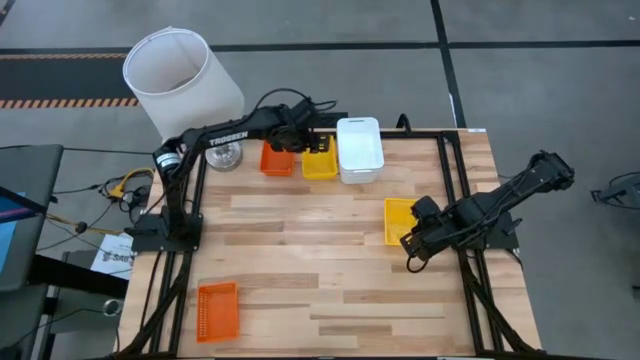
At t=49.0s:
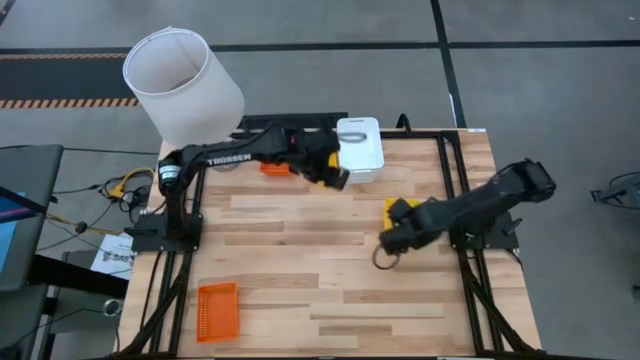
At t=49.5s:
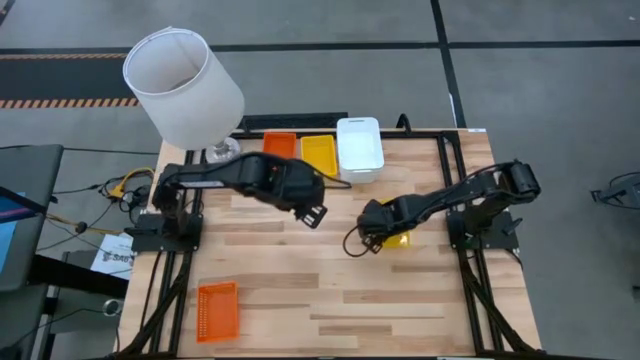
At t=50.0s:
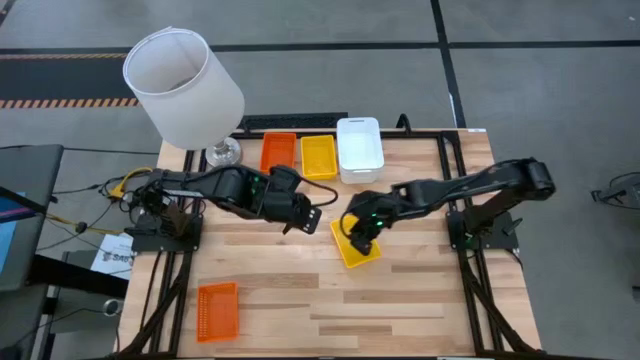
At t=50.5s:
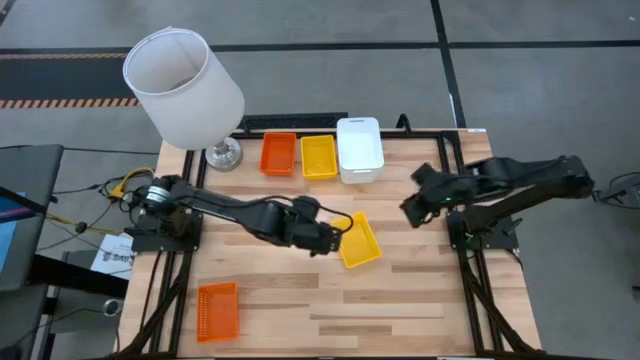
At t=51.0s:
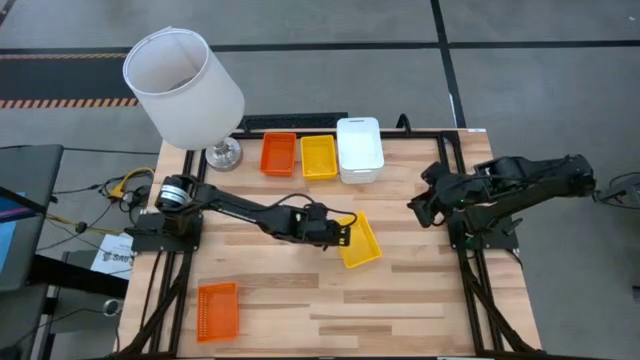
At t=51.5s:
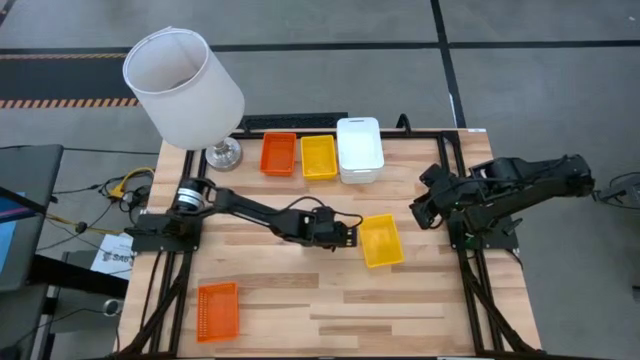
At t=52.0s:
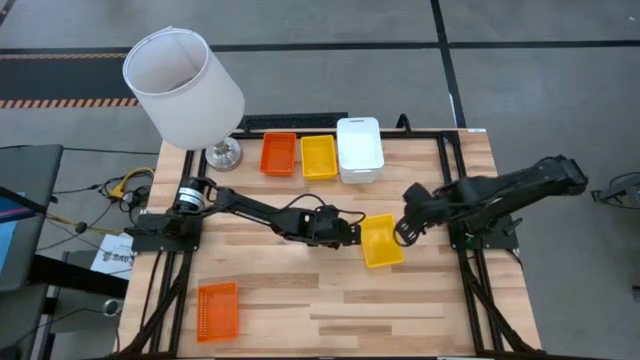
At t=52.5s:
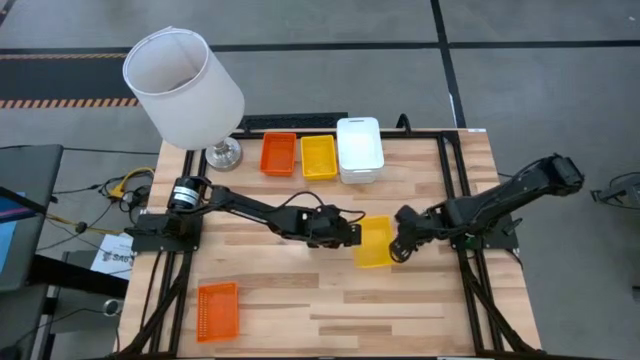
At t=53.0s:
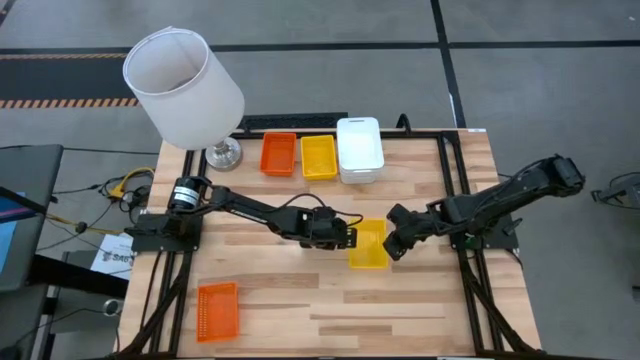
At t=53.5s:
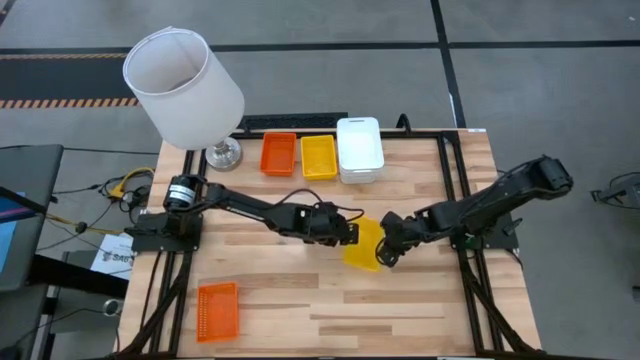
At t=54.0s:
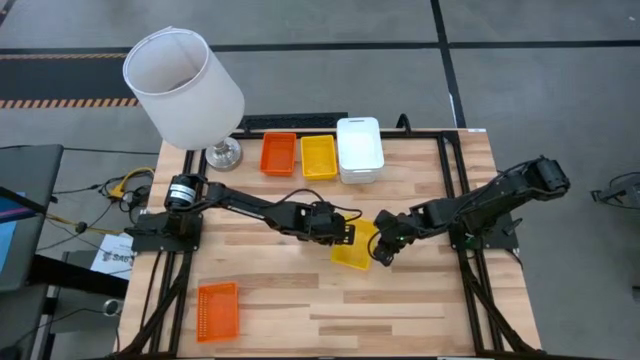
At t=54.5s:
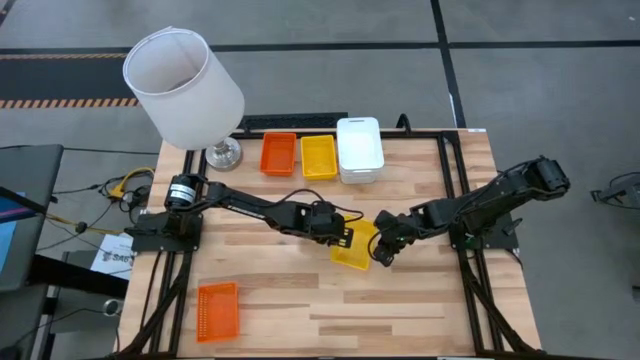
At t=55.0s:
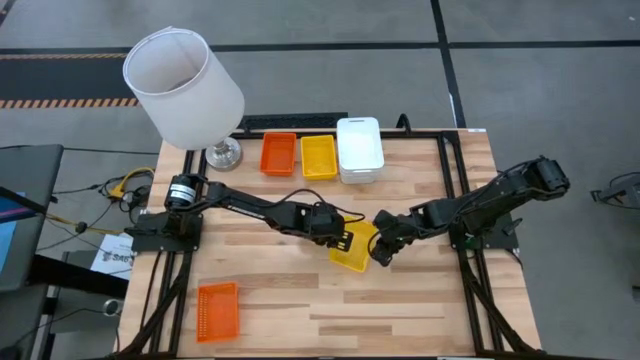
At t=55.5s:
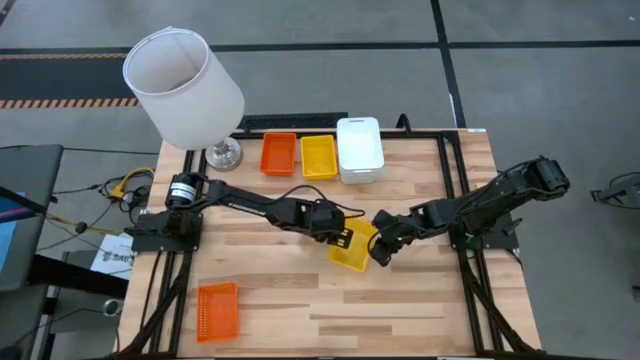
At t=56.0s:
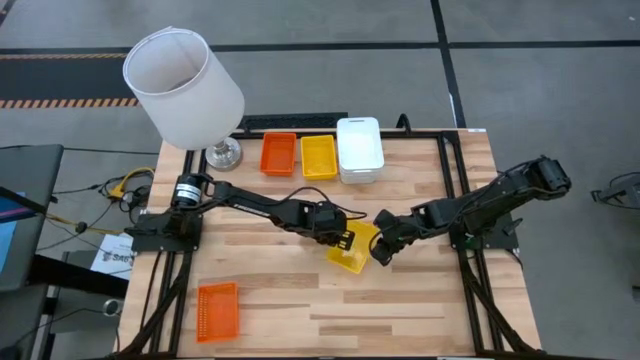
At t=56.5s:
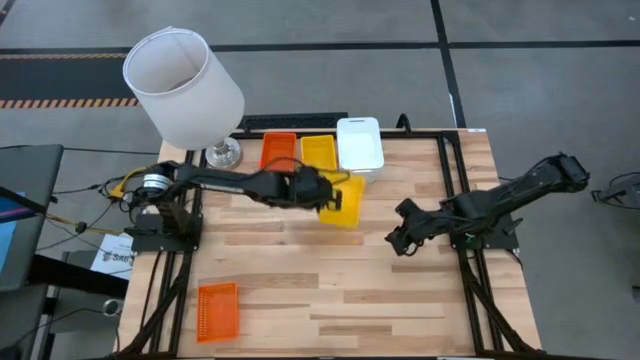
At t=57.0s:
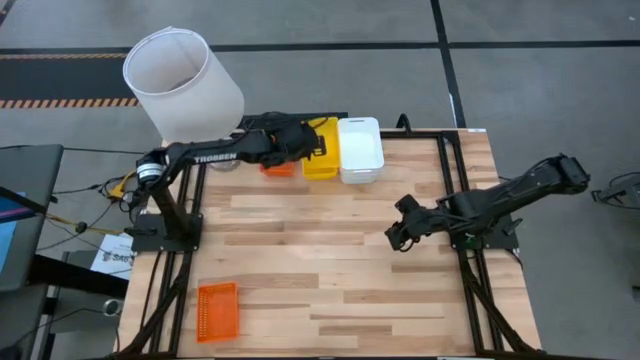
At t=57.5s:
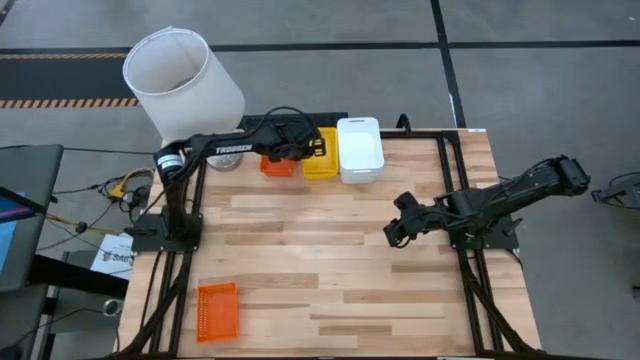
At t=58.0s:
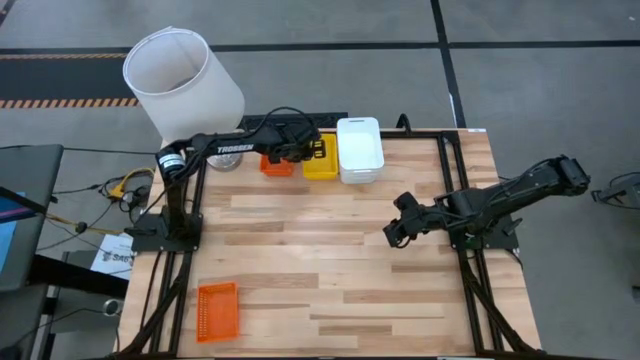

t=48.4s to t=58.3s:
Stack the bottom yellow bin on top of the top yellow bin

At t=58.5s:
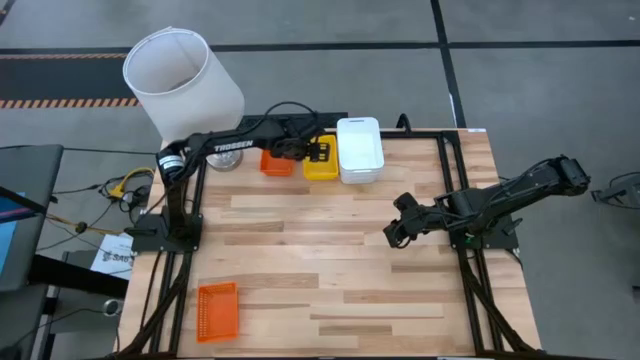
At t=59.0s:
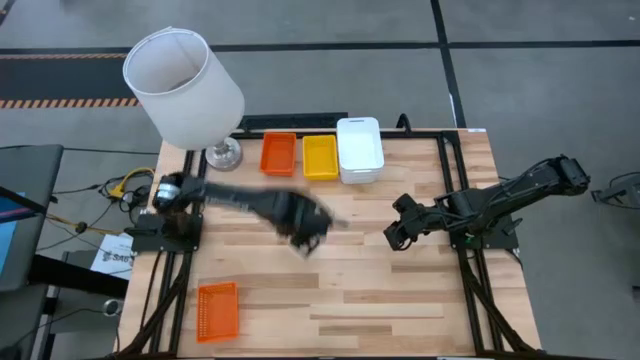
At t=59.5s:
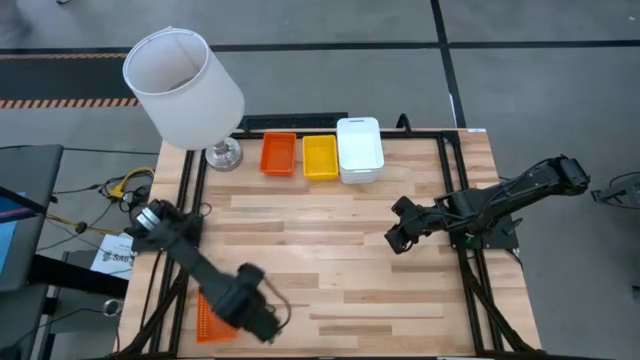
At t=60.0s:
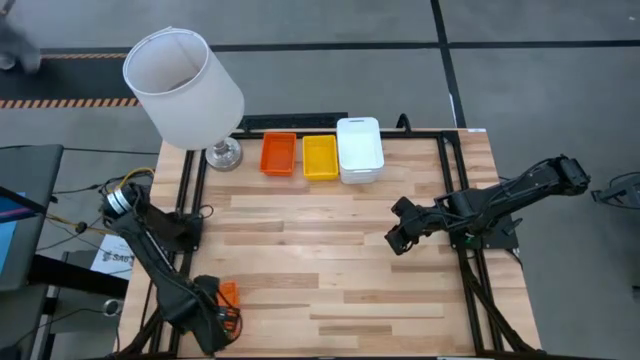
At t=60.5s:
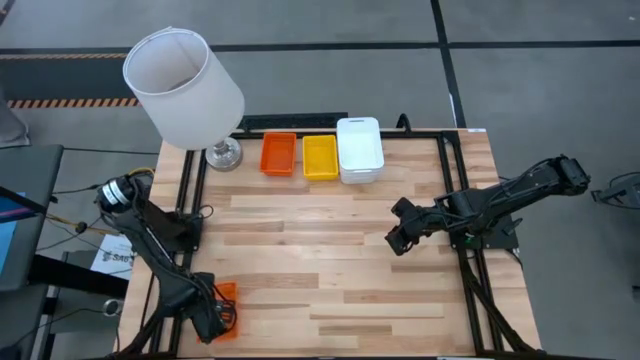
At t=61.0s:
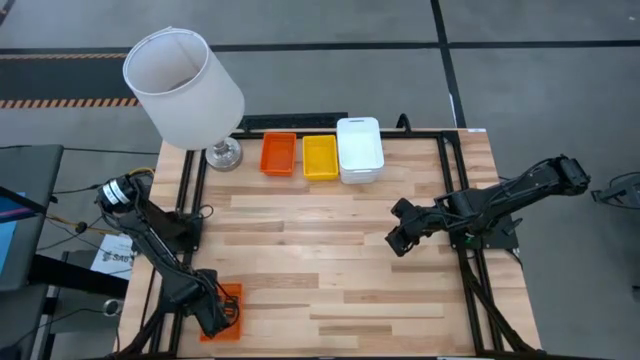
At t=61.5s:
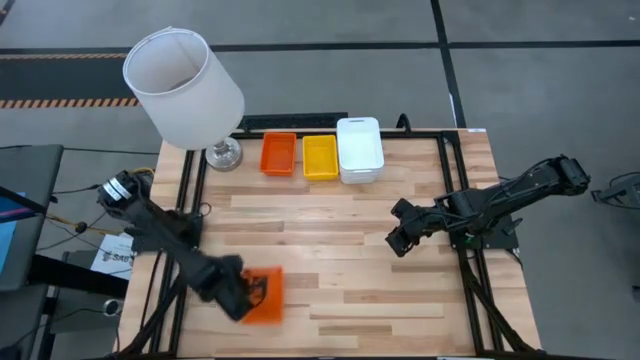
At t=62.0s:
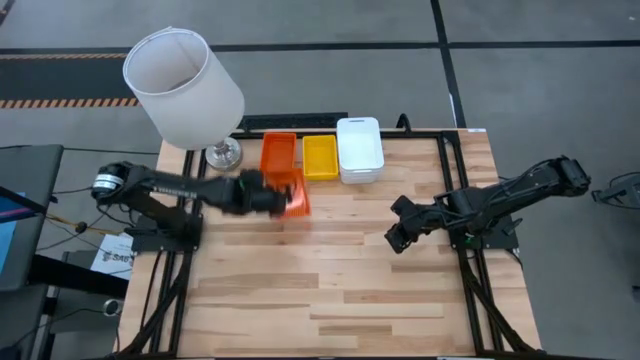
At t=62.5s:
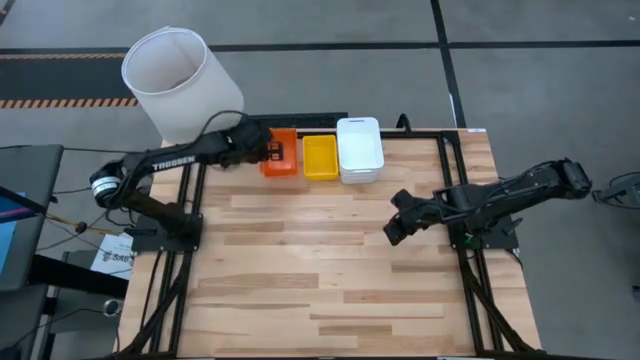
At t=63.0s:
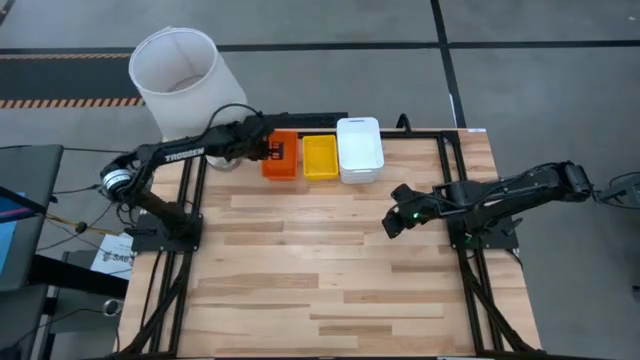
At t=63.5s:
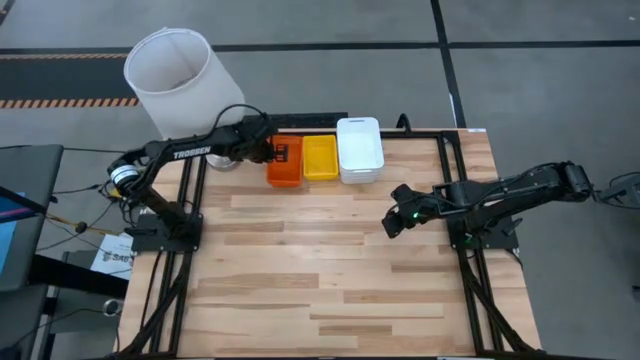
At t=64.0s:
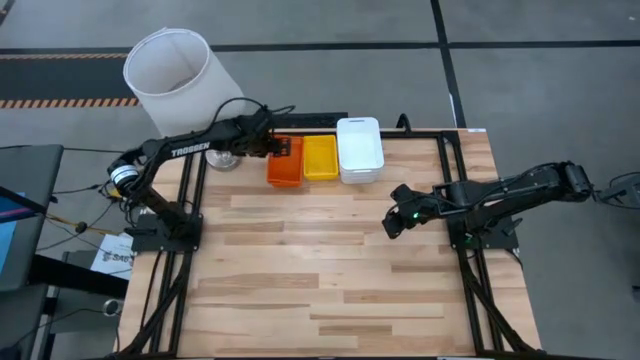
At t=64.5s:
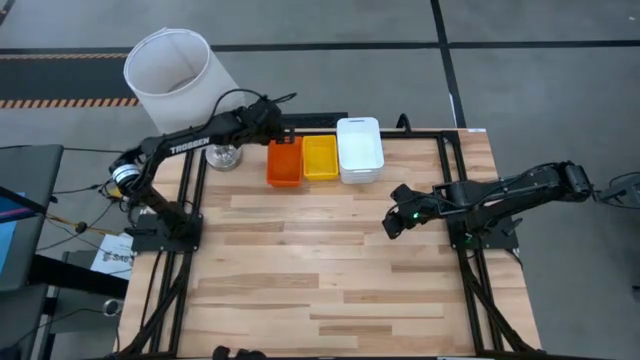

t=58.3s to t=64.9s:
Stack the bottom orange bin on top of the top orange bin

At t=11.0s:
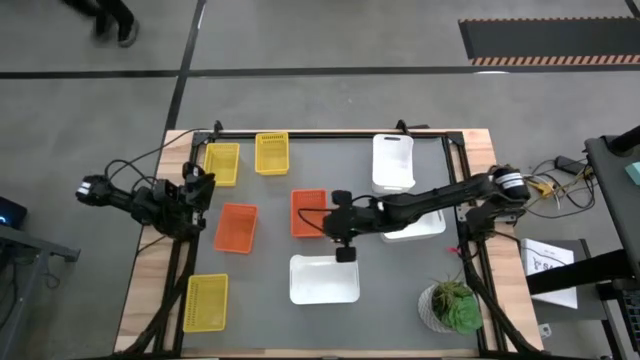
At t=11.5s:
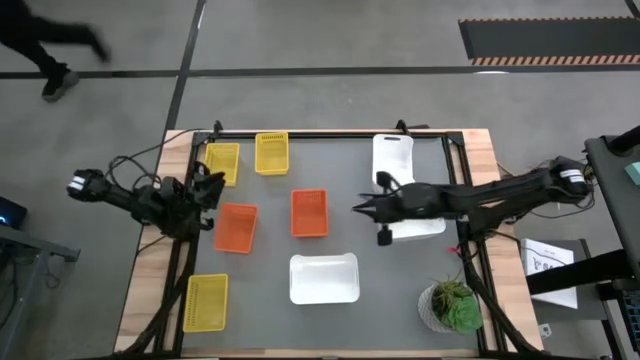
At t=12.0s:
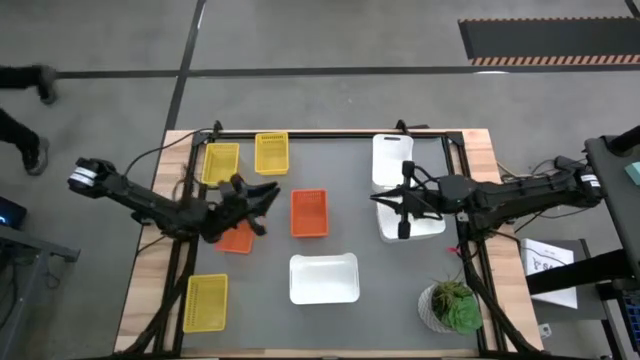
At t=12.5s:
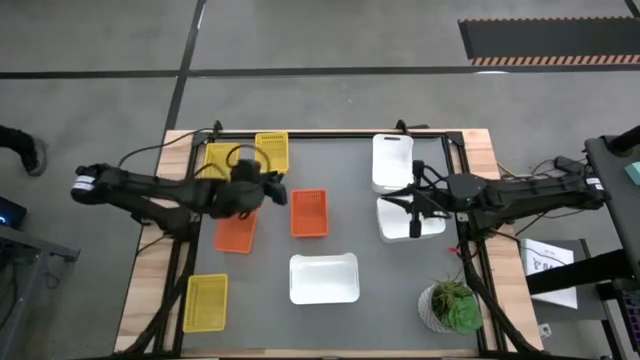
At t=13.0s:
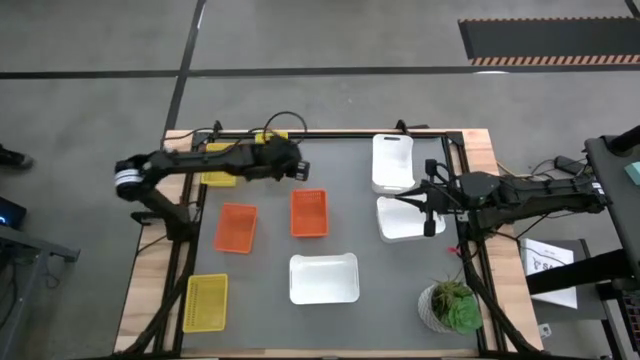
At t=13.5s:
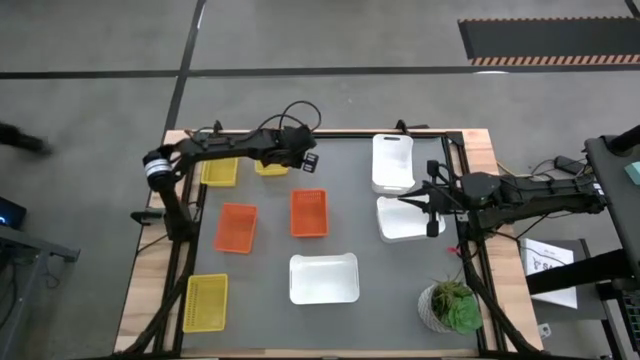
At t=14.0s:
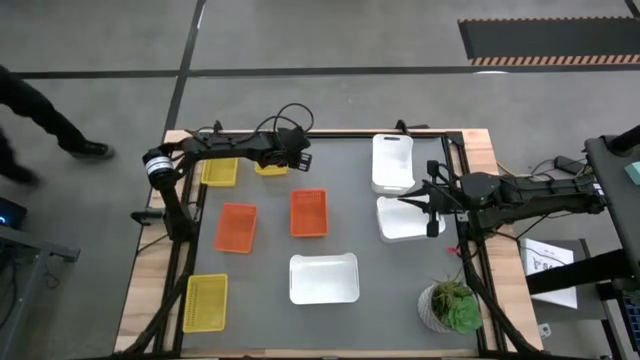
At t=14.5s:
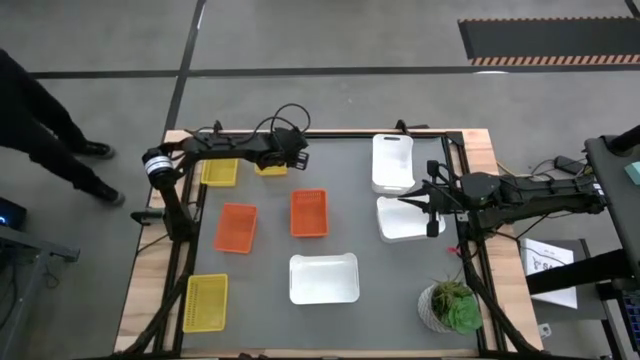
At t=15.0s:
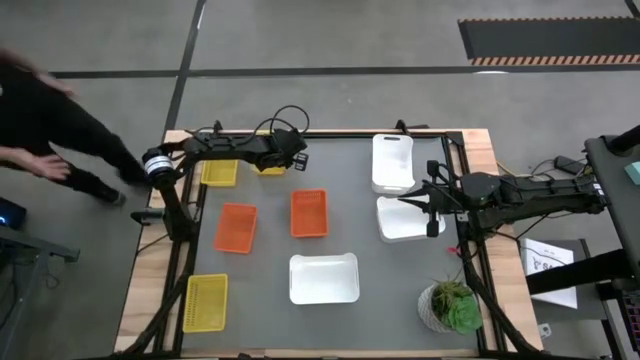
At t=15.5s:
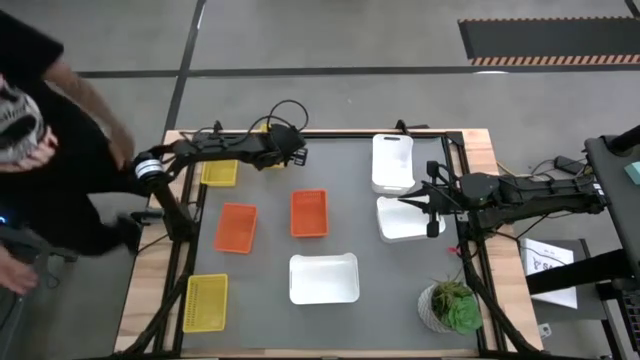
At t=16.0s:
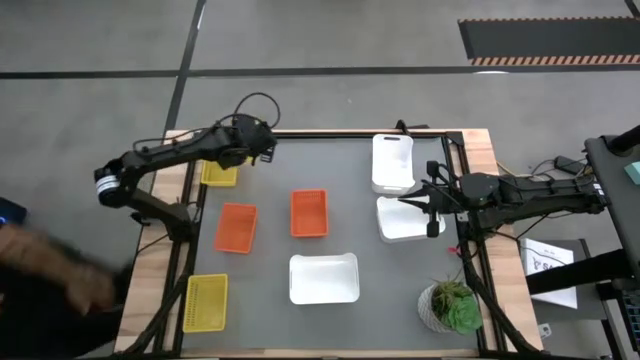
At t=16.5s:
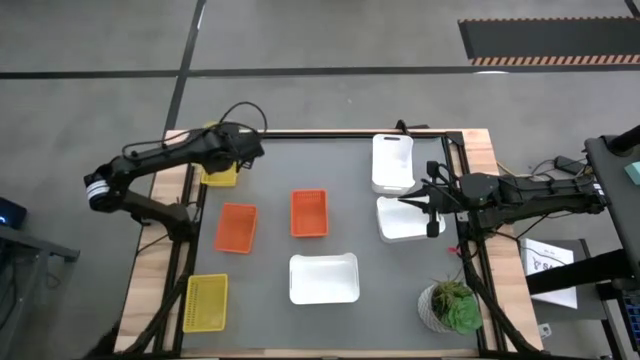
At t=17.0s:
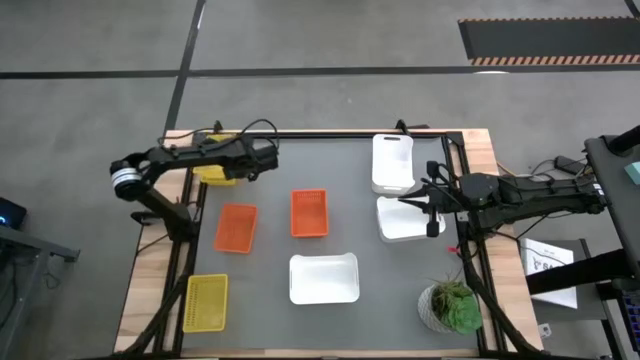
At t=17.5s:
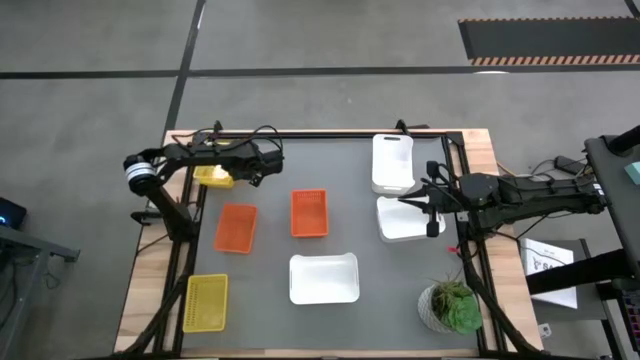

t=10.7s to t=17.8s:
Stack the top right yellow bin on top of the top left yellow bin
